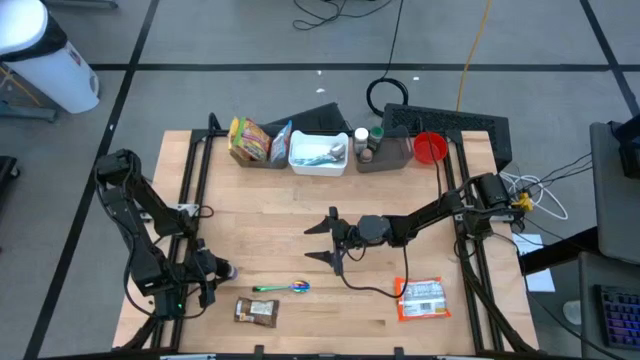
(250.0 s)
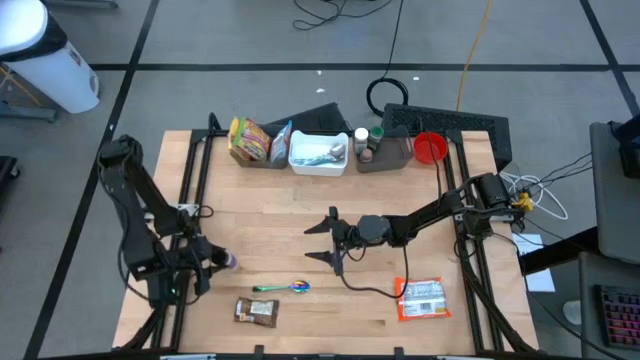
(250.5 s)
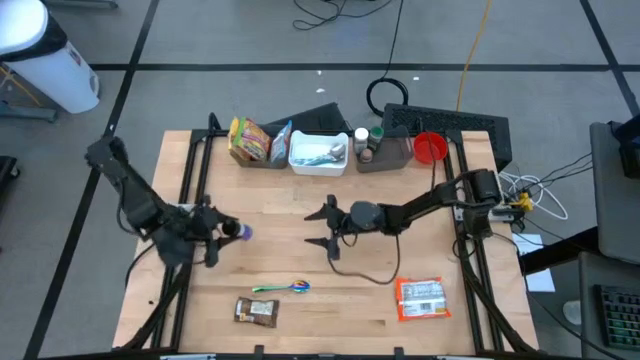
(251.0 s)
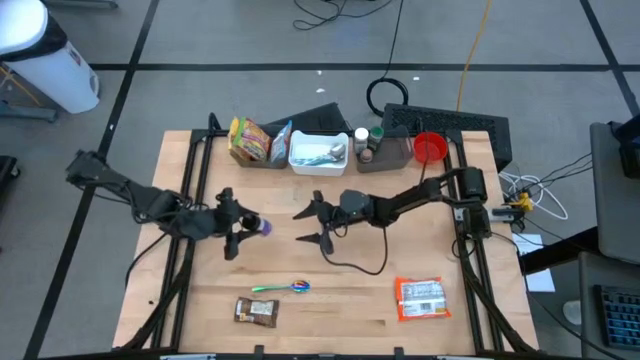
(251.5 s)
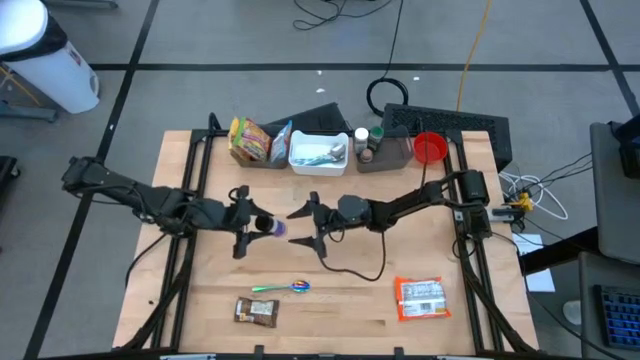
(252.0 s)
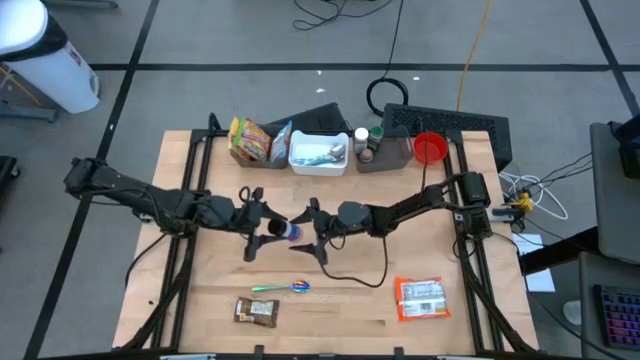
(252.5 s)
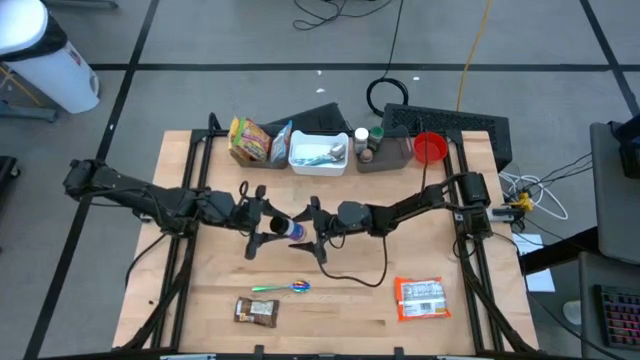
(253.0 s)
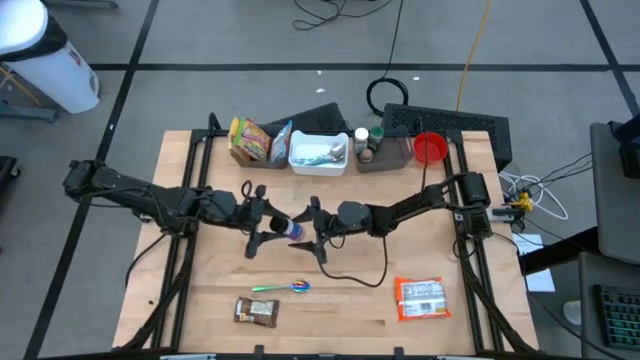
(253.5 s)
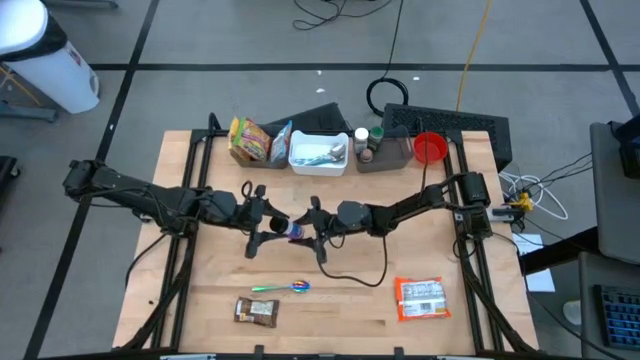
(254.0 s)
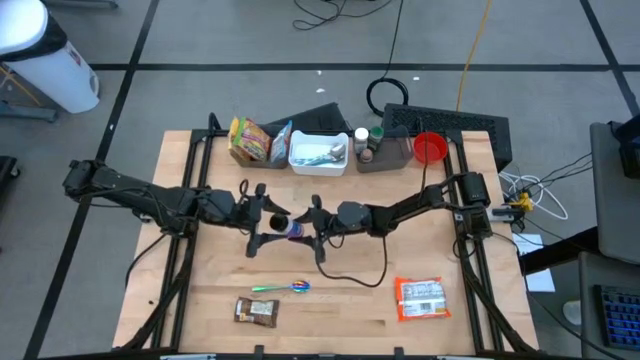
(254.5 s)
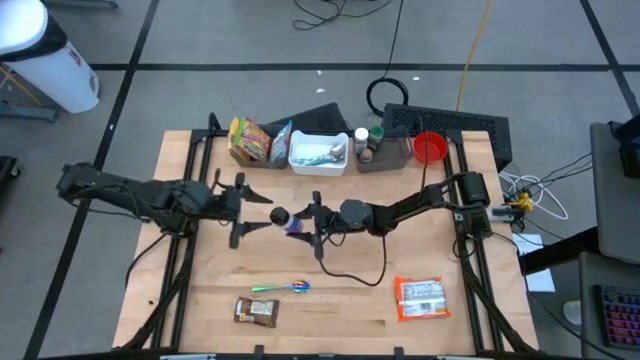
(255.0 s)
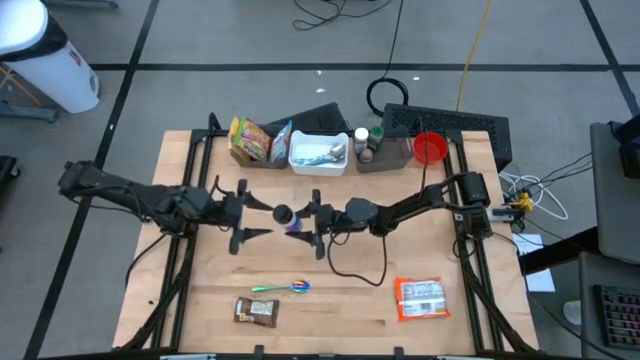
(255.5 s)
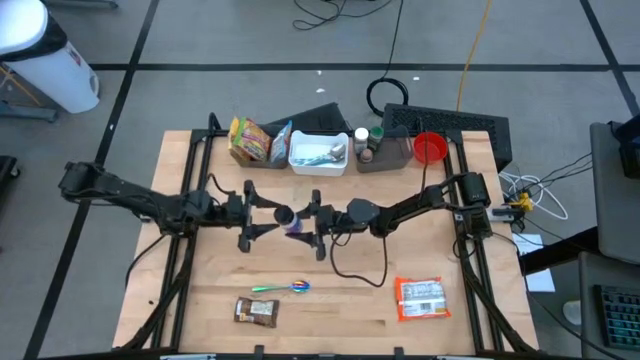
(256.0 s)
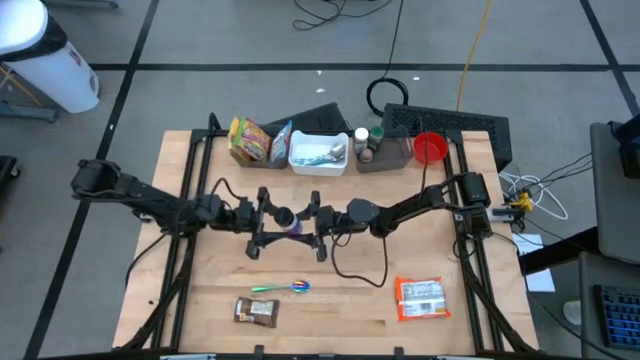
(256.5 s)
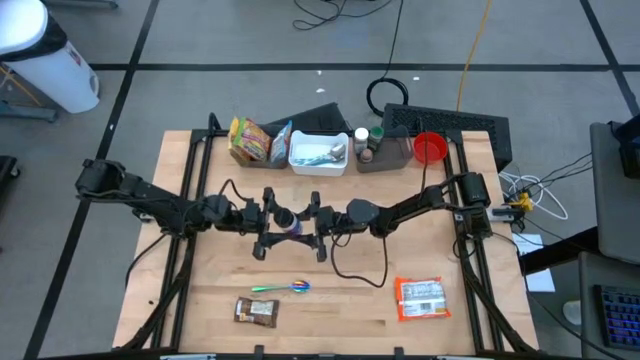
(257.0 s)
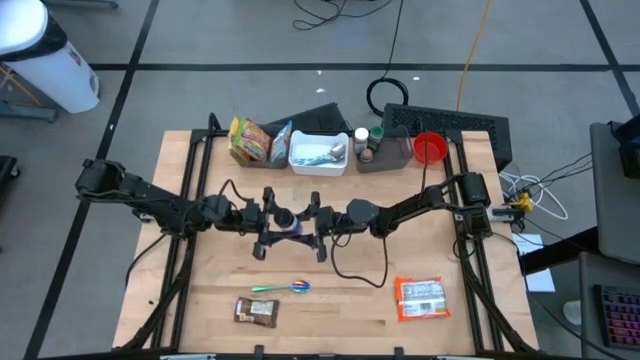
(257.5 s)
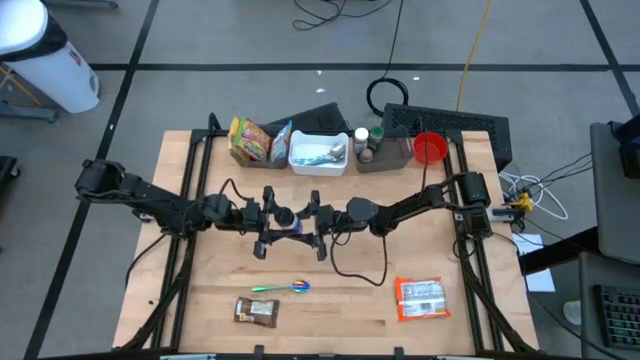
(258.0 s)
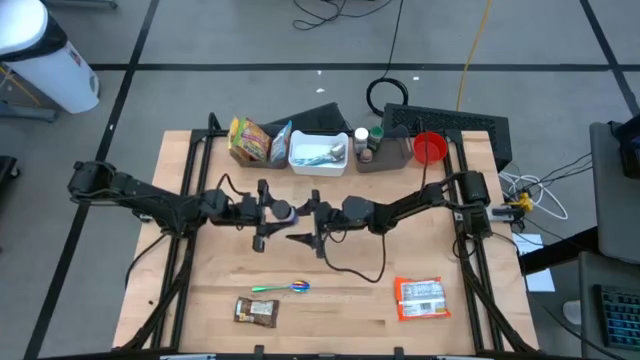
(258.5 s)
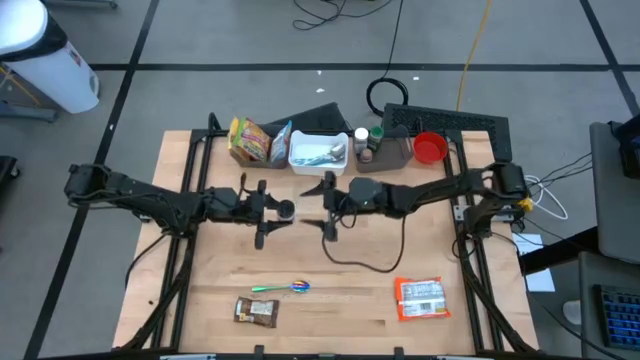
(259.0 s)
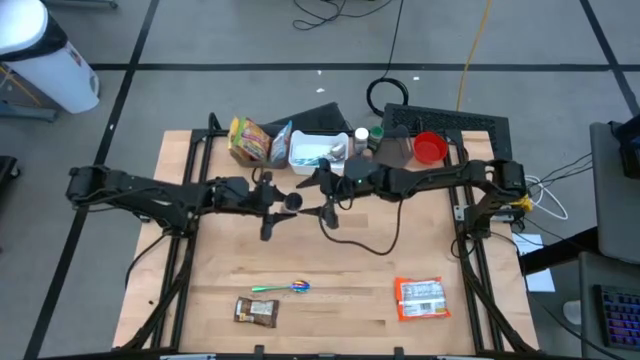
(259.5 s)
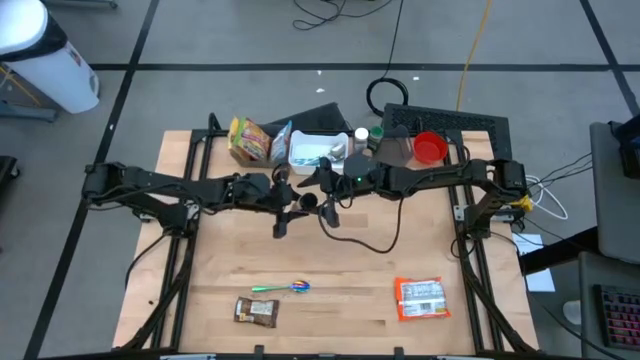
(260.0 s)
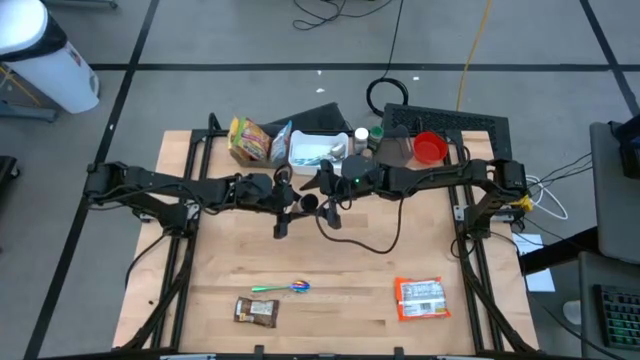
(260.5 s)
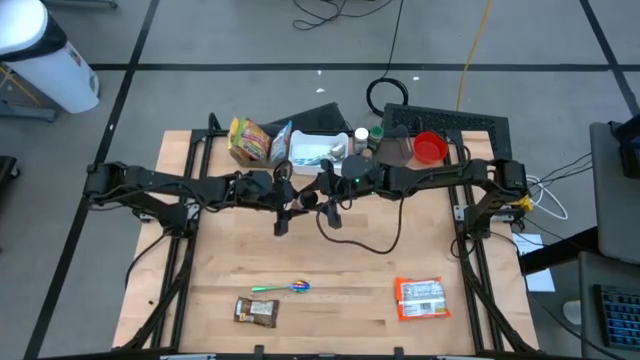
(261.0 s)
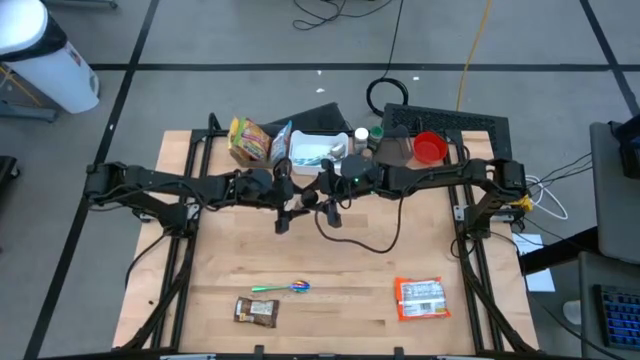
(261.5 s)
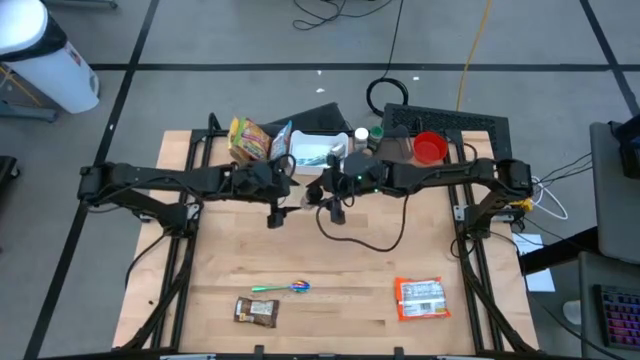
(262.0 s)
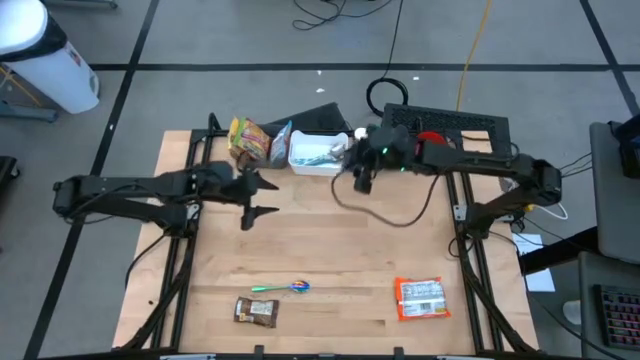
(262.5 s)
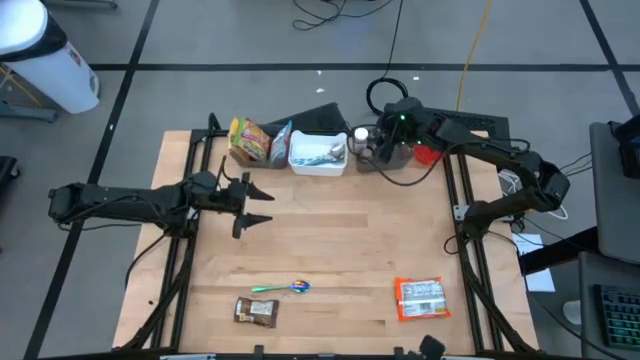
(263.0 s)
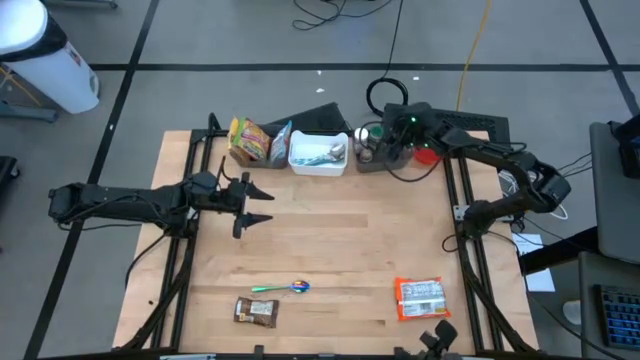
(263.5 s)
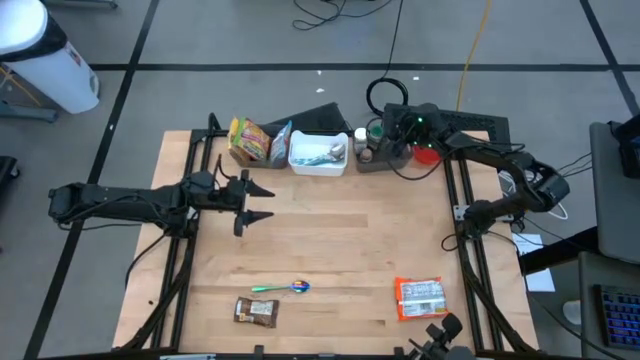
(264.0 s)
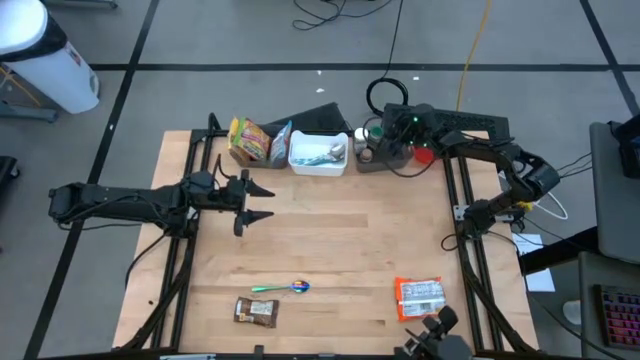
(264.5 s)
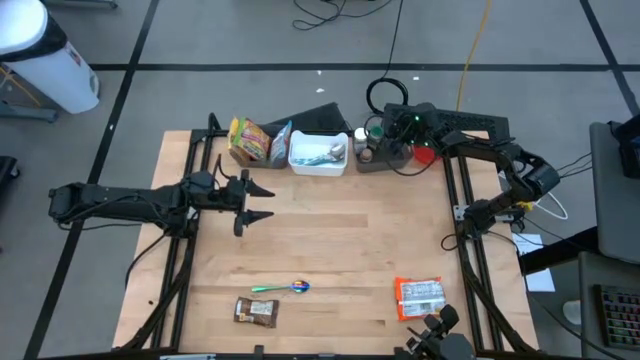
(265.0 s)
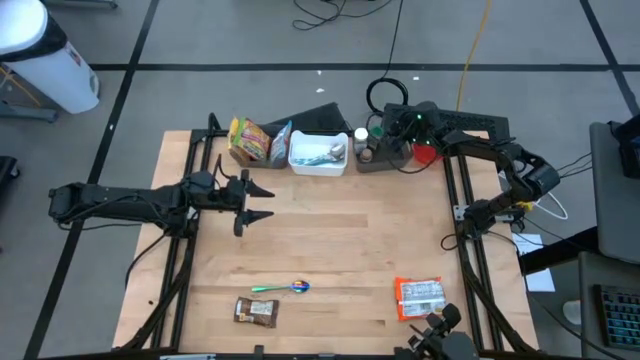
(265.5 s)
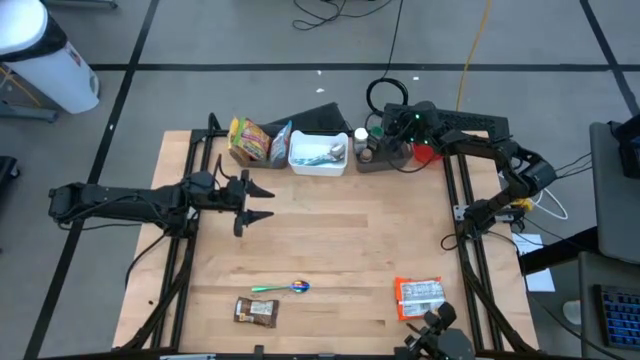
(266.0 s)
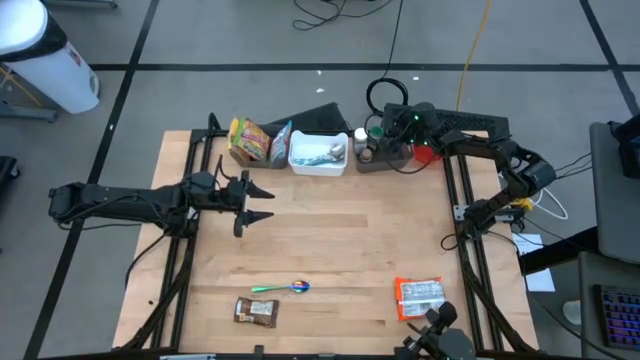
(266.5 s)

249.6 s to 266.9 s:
Task: Pick & Place Food Item
Put the violet seasoning into the right black bin

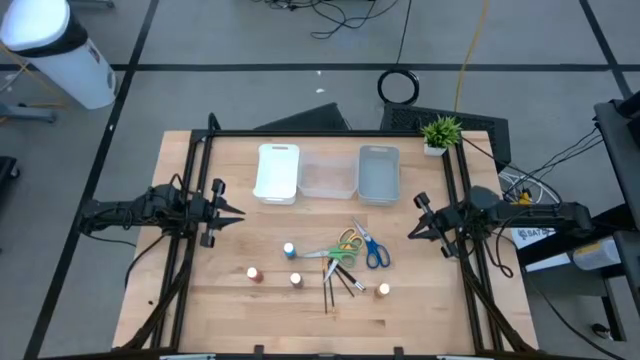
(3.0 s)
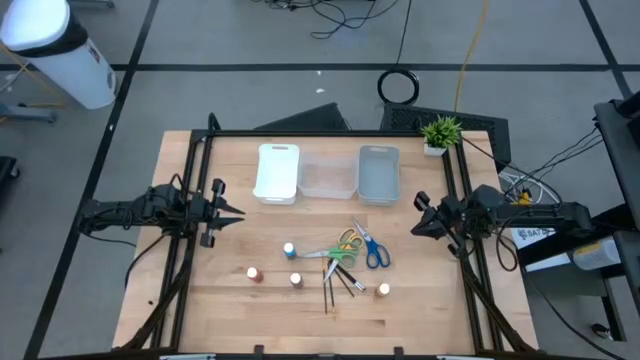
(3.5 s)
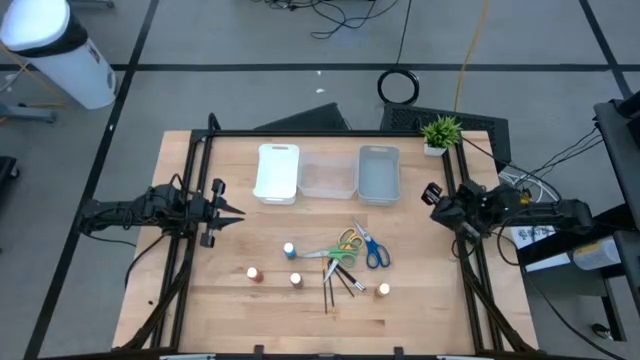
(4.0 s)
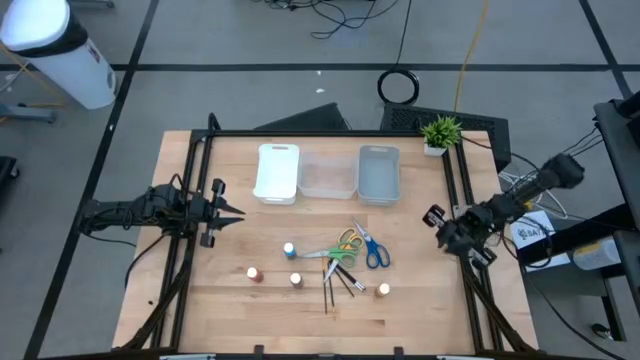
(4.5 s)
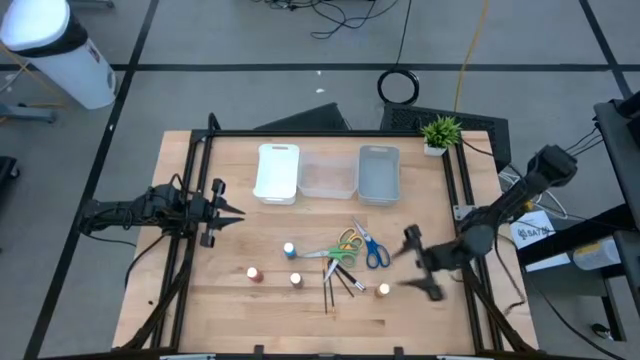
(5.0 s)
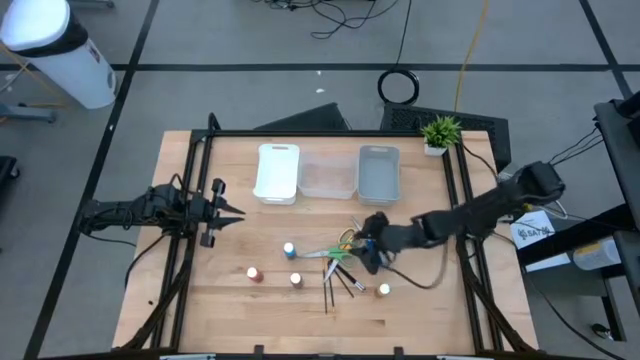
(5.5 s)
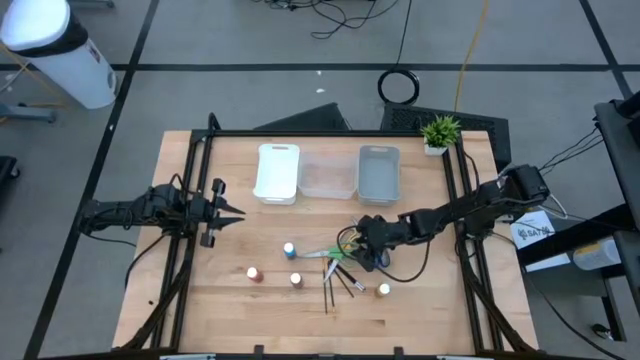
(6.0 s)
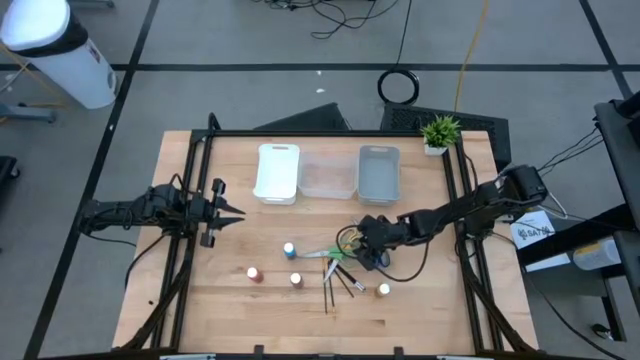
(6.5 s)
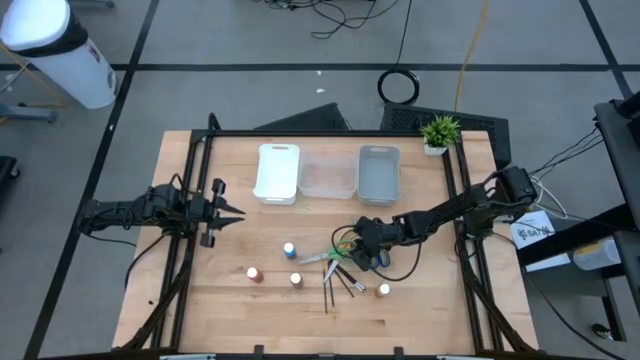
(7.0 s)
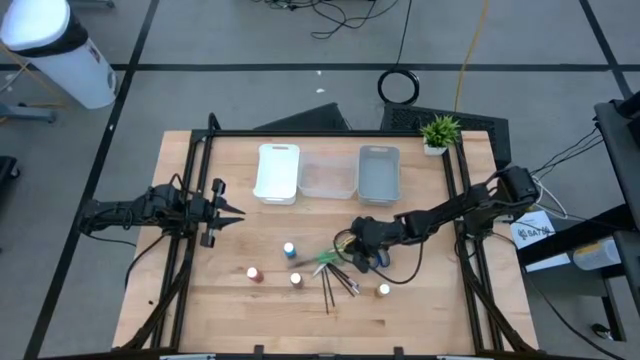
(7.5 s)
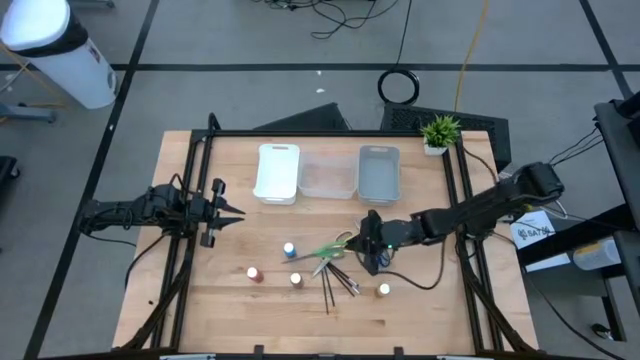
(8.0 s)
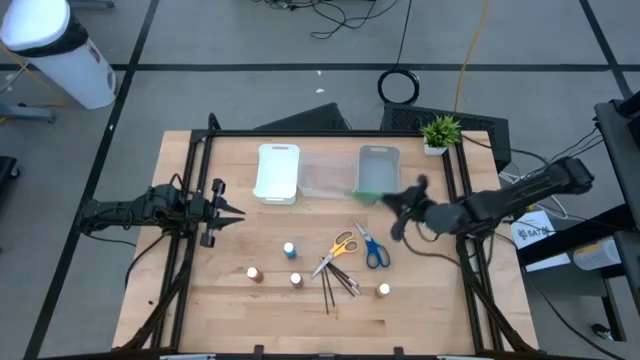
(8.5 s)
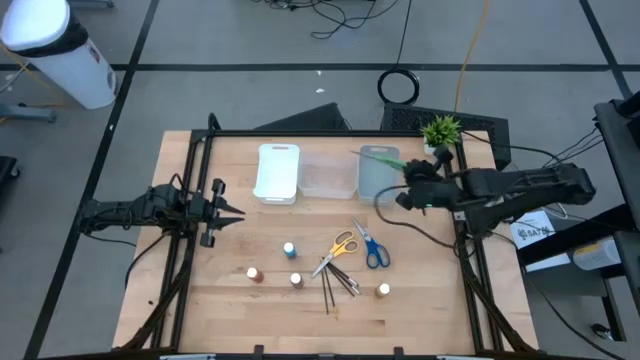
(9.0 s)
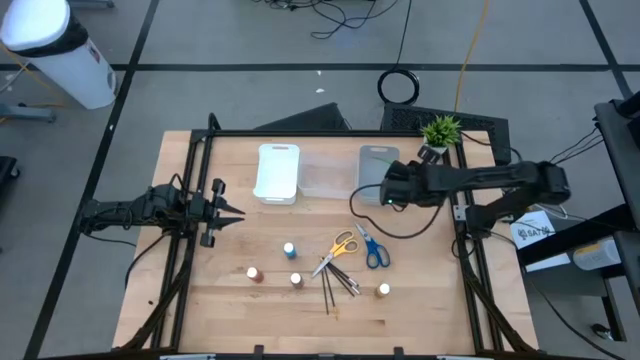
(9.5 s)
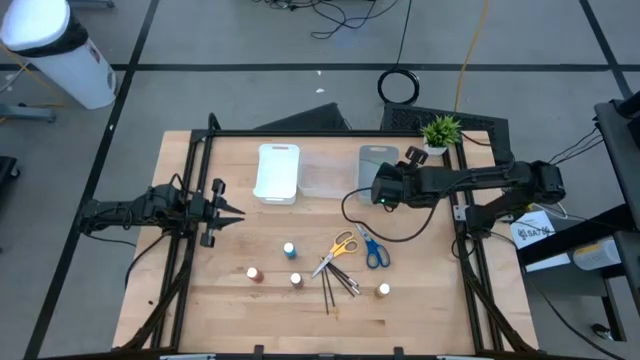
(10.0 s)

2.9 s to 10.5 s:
Task: Pick & Place Paint Supplies
Put the green scissors in the gray bin
